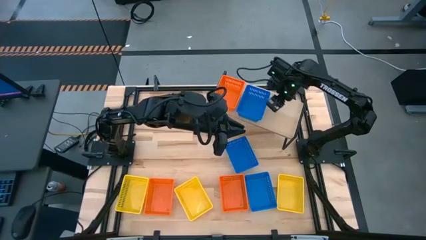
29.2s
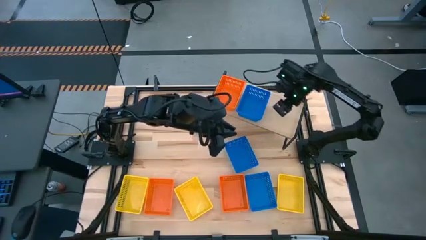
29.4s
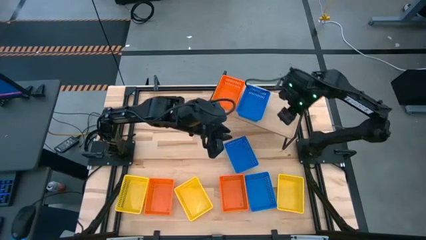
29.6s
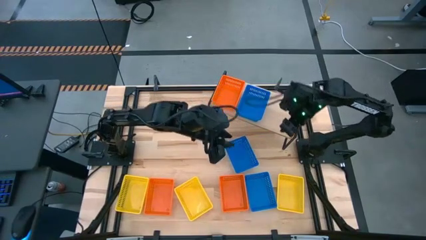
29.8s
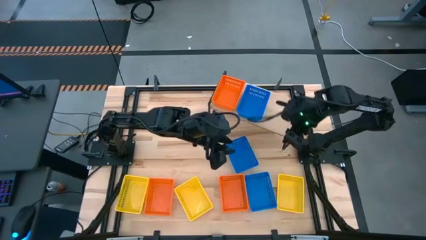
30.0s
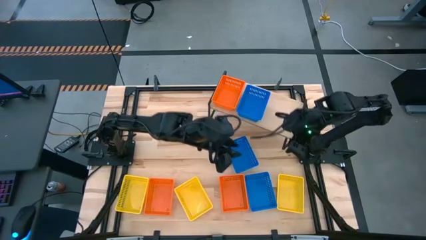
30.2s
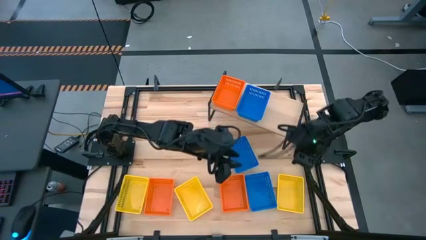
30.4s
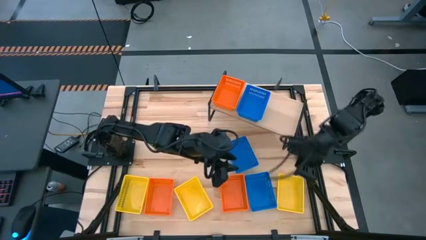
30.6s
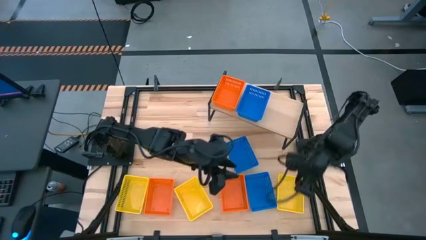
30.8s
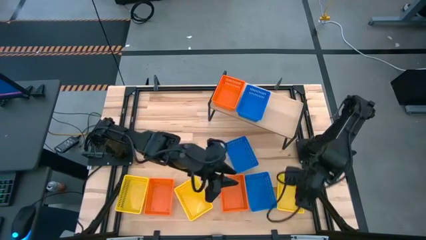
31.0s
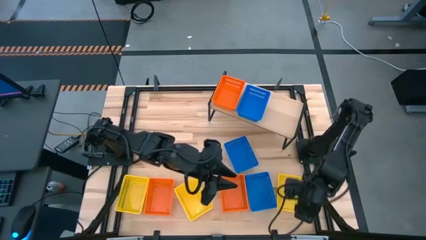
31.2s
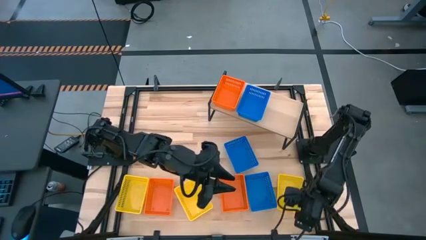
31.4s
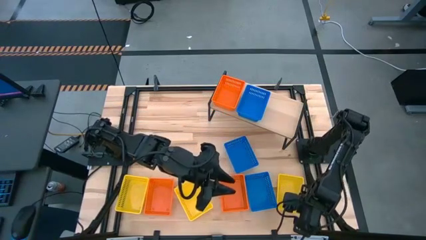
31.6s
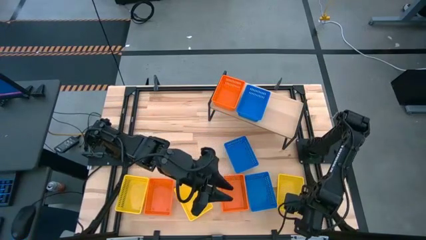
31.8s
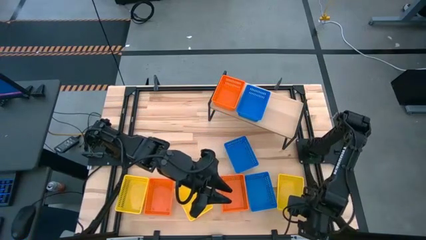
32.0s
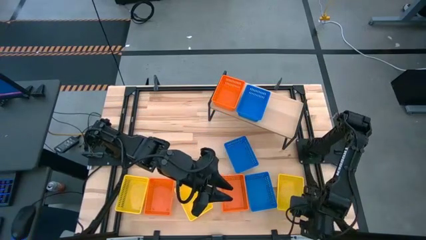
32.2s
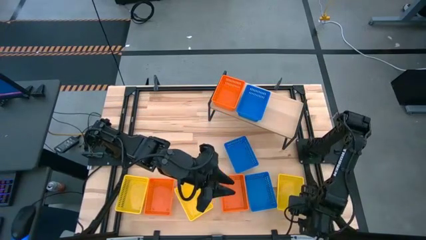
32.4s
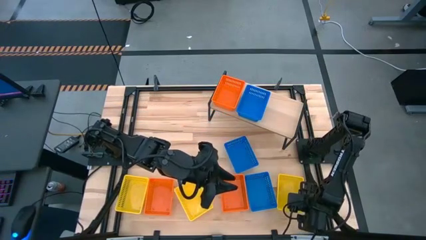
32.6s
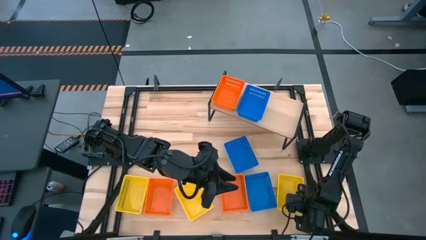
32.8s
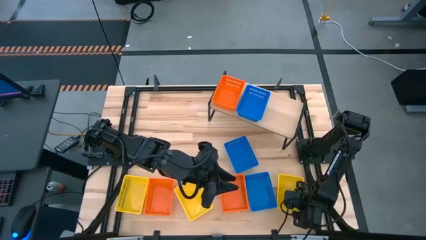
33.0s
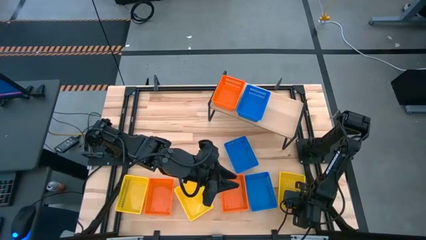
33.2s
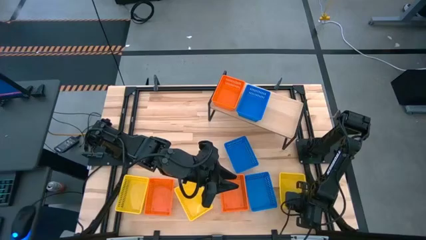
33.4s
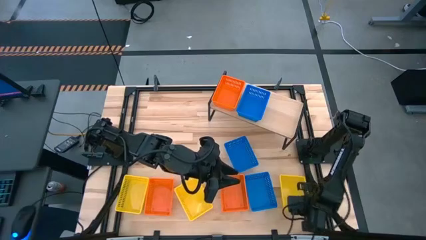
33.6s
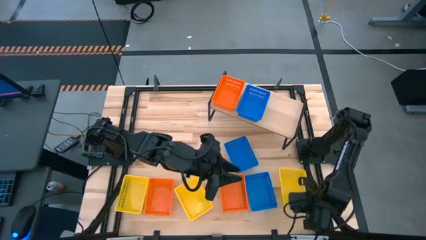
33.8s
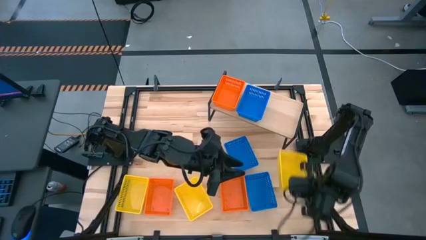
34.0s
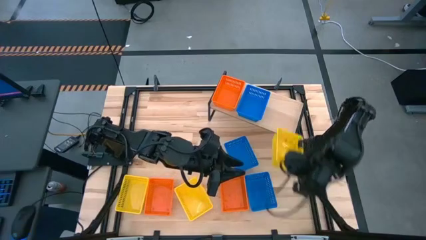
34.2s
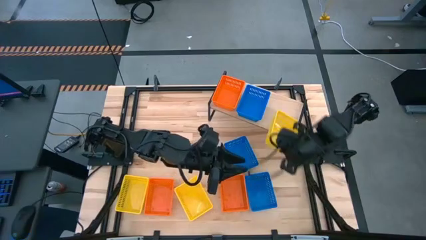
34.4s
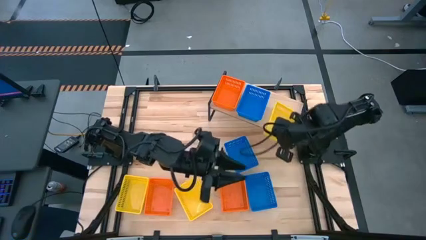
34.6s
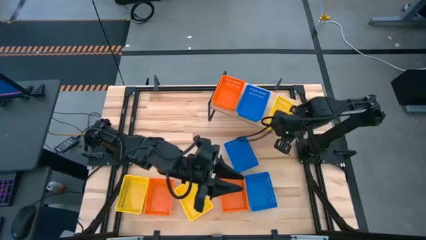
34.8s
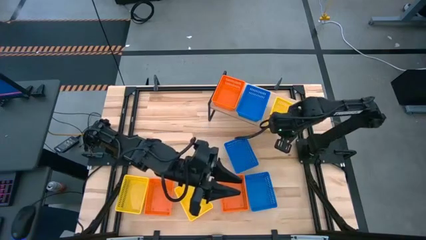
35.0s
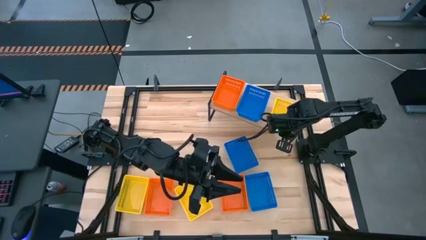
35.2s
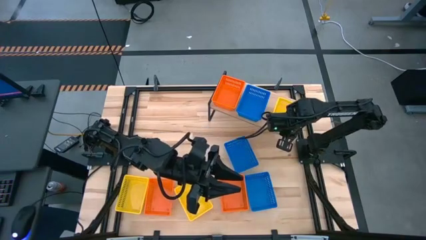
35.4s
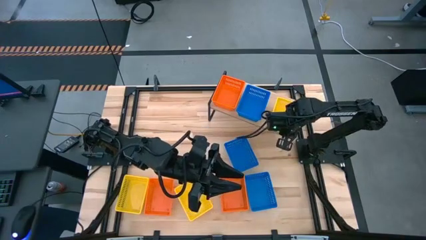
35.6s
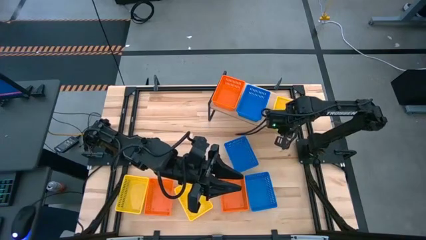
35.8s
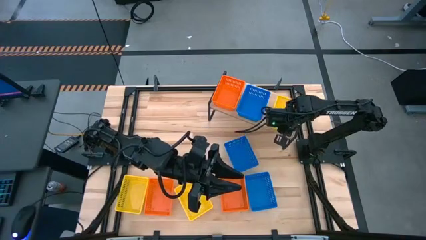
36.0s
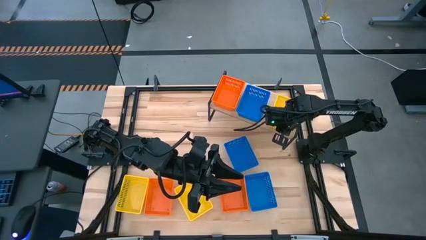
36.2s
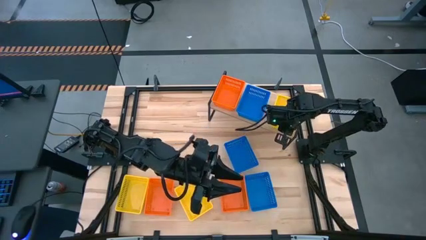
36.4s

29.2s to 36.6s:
Task: Stack baskets on shelf by color
Put the right yellow basket on the shelf

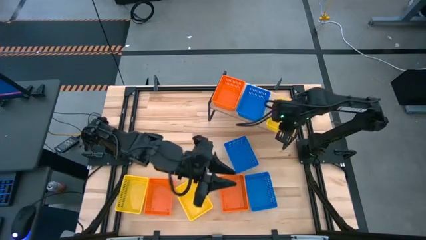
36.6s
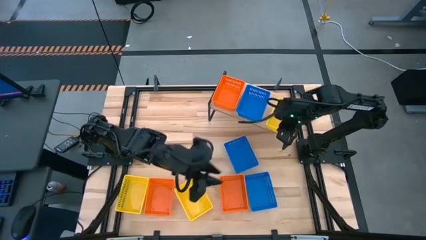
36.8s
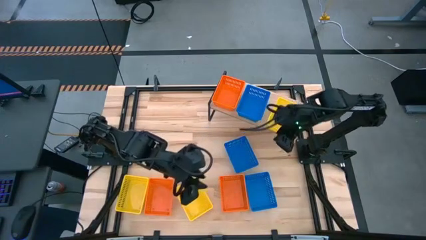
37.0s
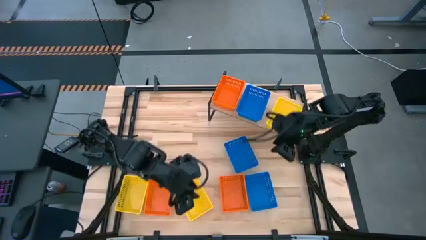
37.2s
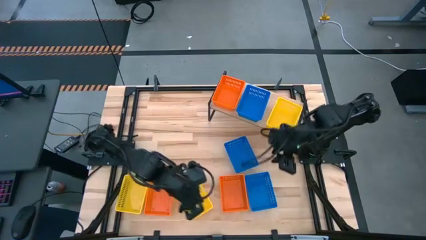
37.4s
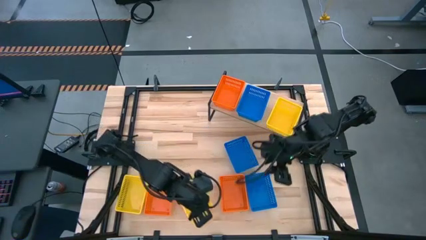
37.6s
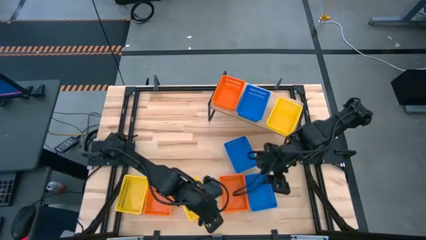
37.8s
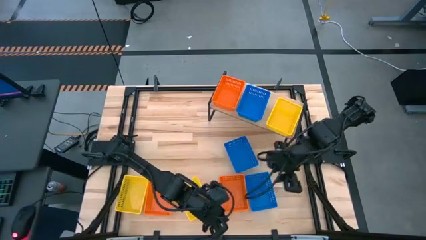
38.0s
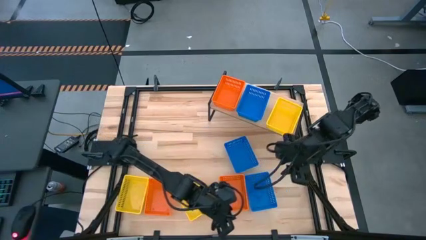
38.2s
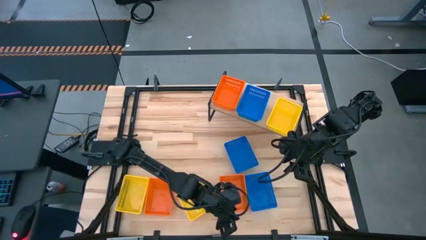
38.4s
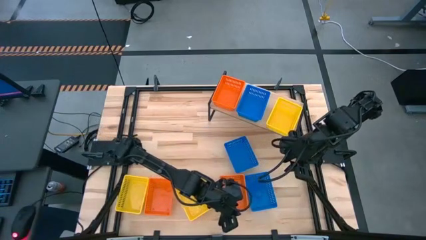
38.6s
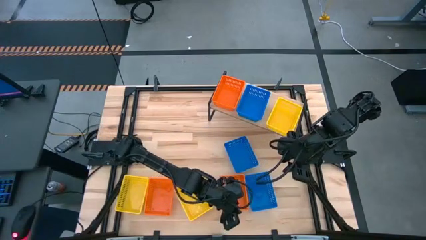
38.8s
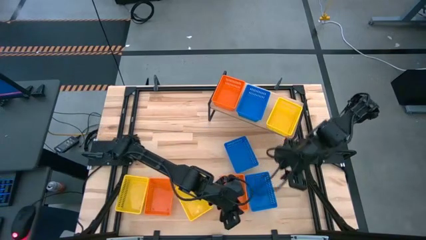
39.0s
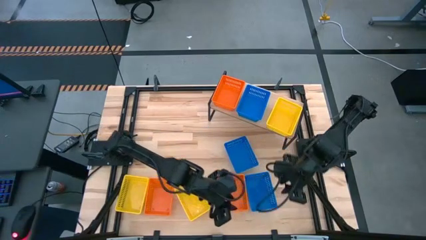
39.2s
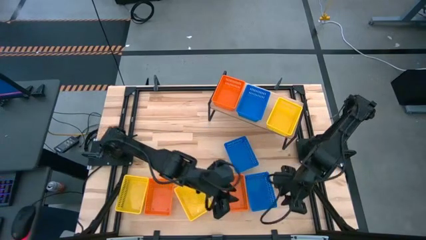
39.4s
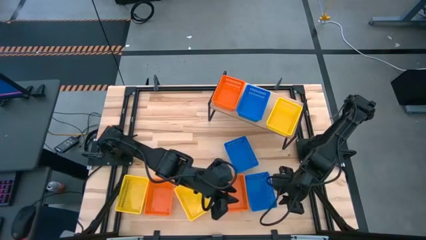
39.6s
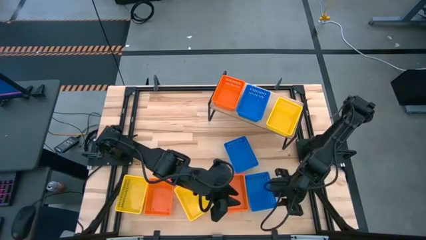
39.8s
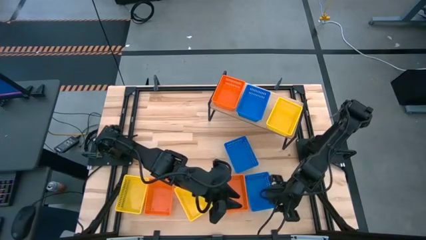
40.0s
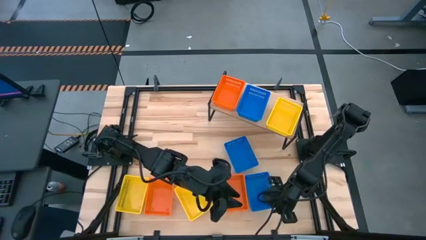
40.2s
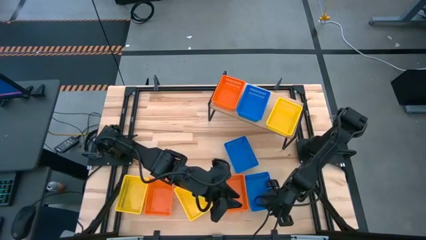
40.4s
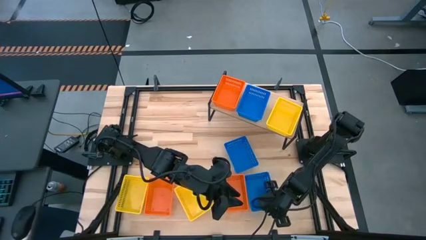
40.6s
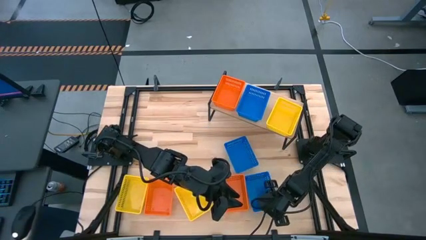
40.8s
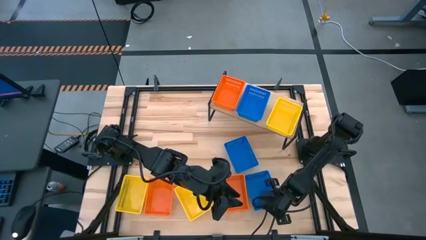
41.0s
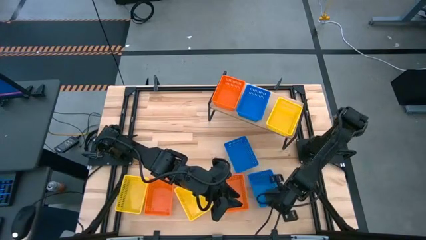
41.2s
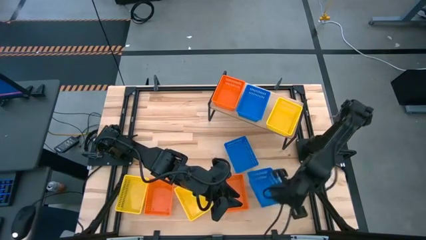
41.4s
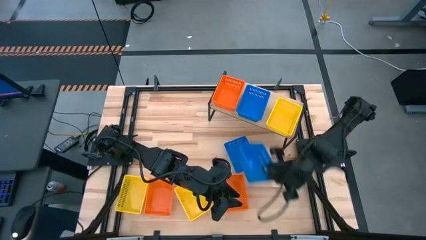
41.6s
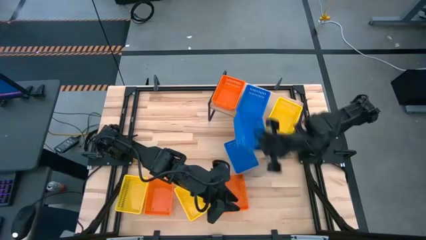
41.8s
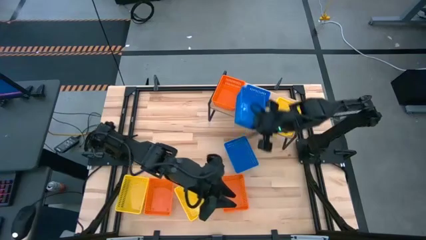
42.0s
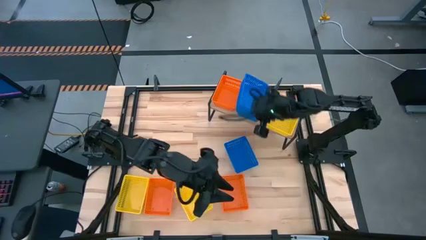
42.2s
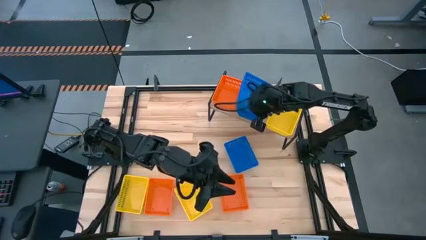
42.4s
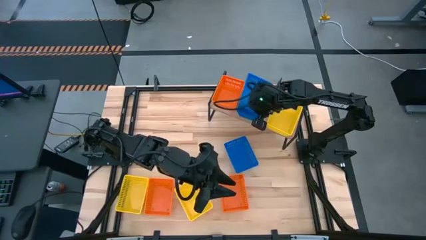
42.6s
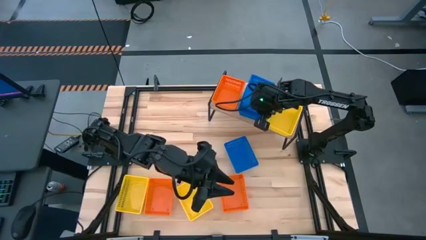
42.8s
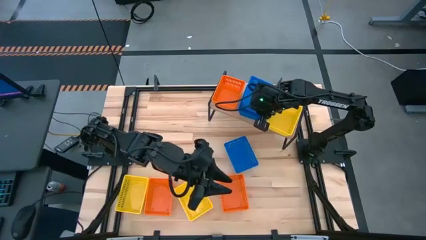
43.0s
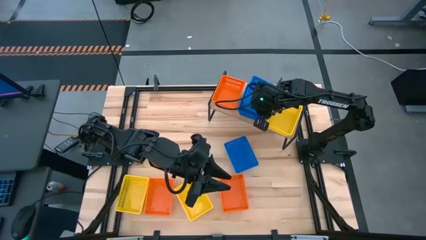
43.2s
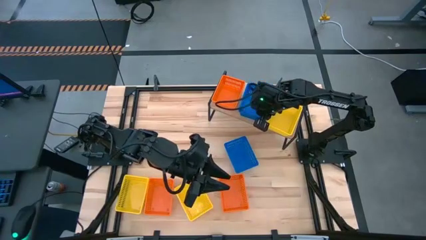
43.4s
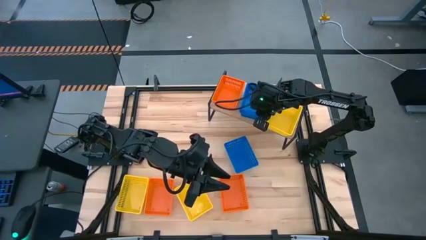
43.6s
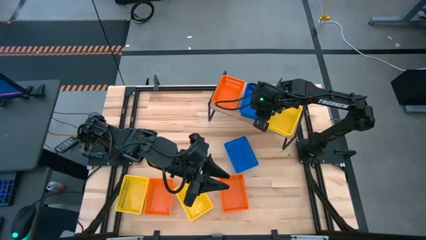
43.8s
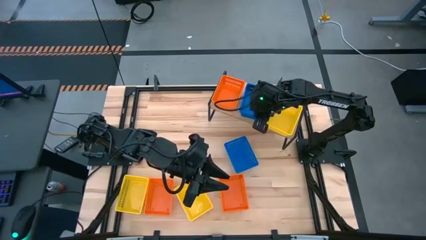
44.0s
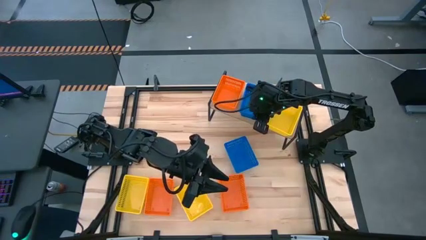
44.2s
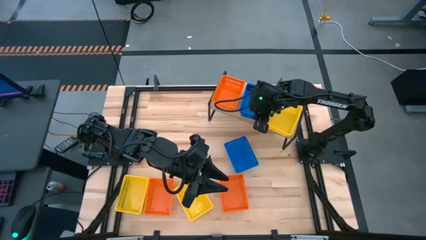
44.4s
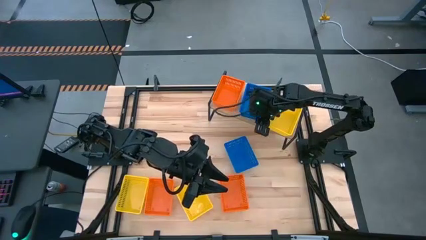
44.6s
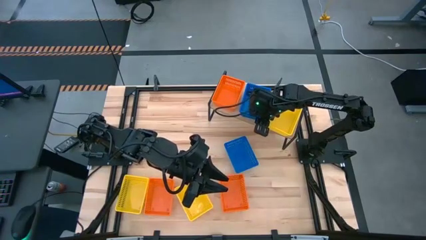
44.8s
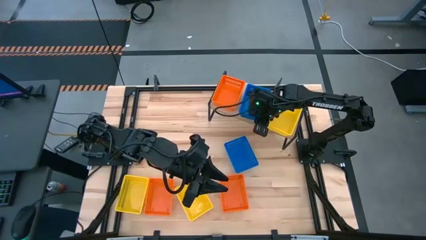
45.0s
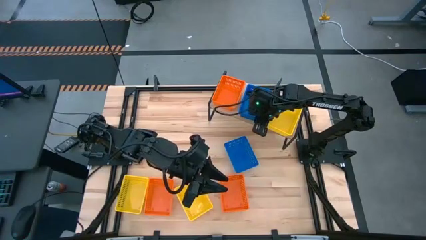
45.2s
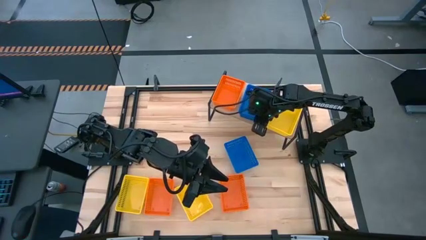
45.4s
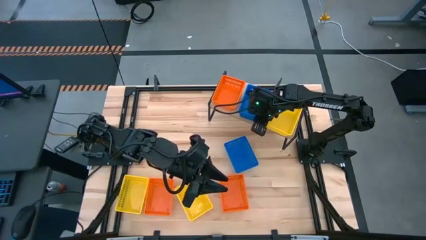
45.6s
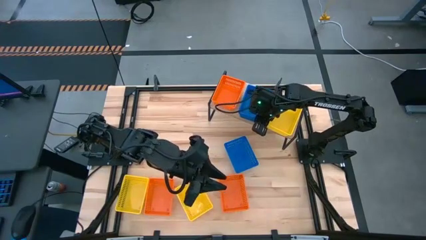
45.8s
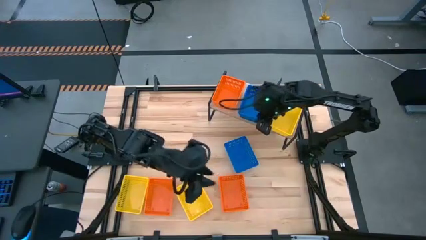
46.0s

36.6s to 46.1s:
Stack the bottom blue basket on the blue basket on the shelf
